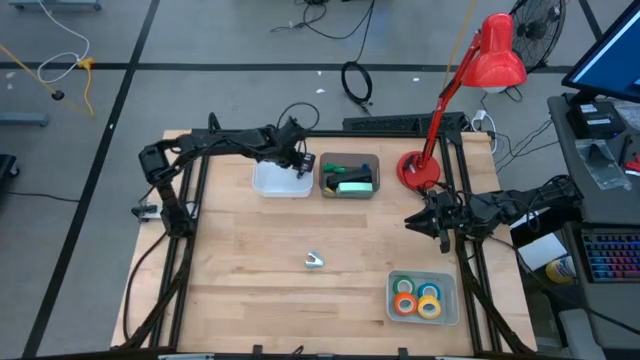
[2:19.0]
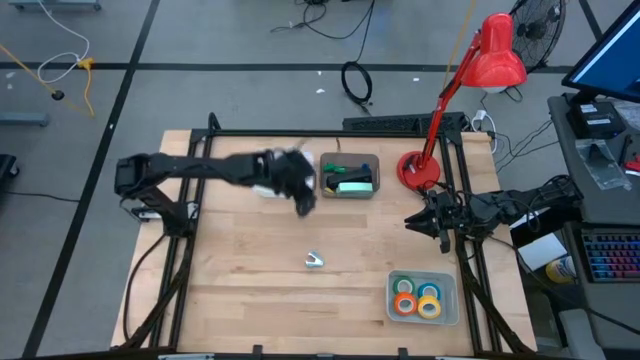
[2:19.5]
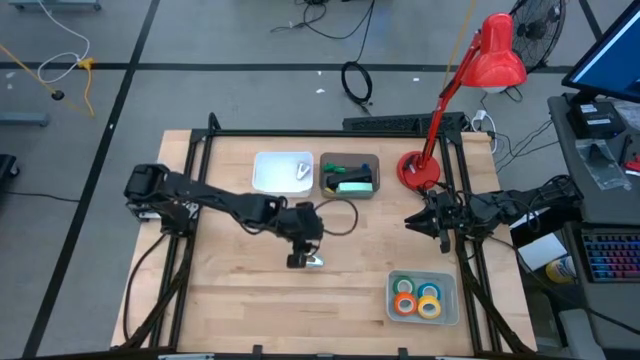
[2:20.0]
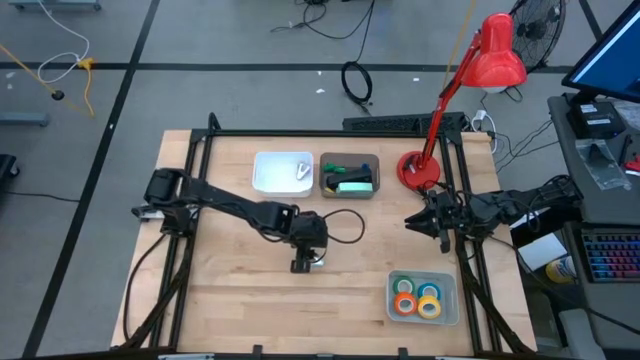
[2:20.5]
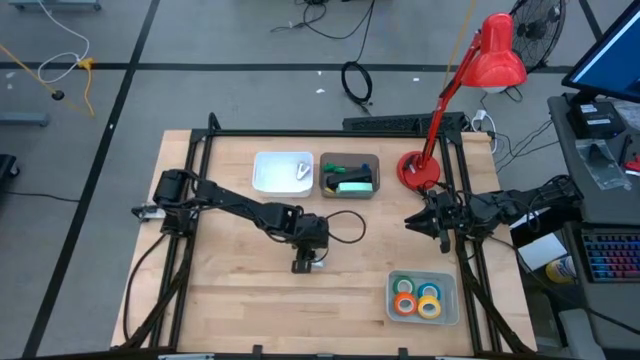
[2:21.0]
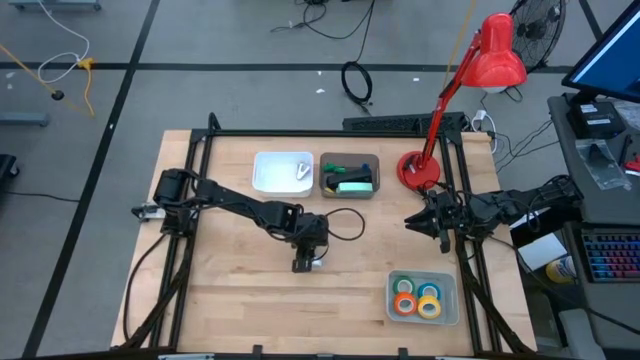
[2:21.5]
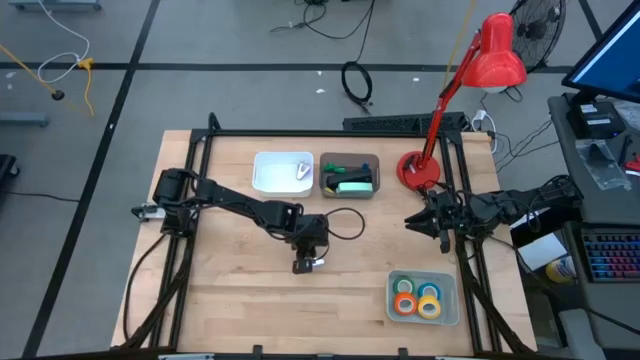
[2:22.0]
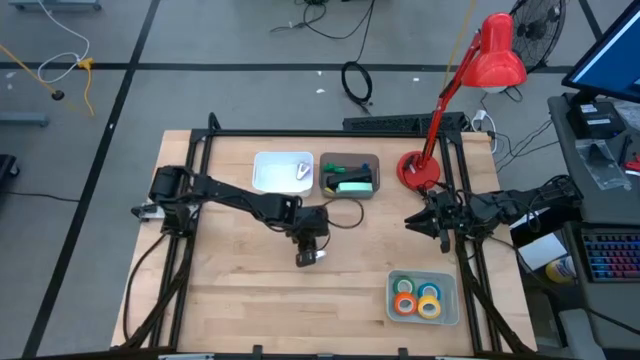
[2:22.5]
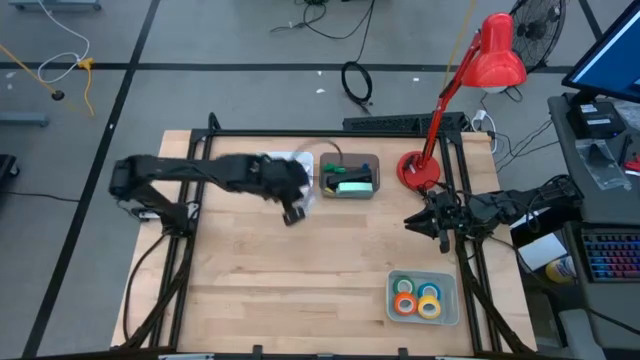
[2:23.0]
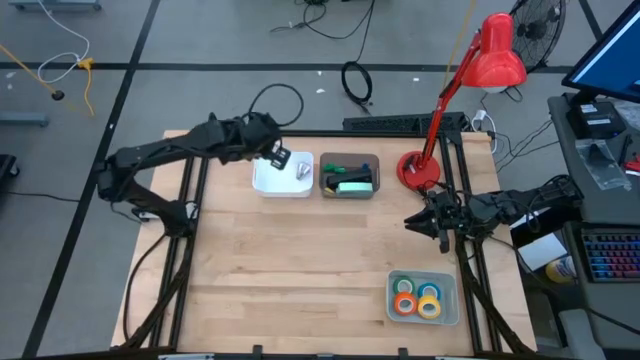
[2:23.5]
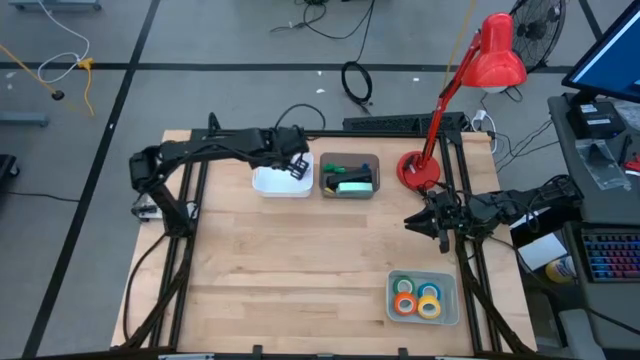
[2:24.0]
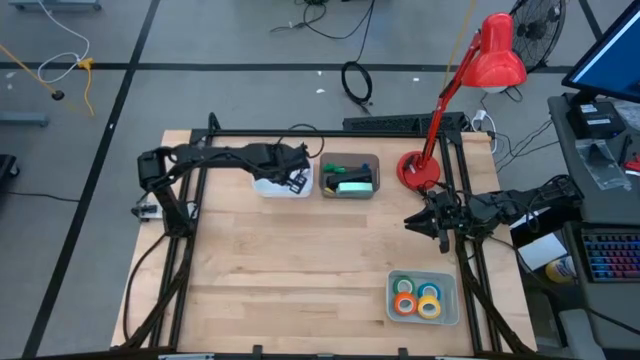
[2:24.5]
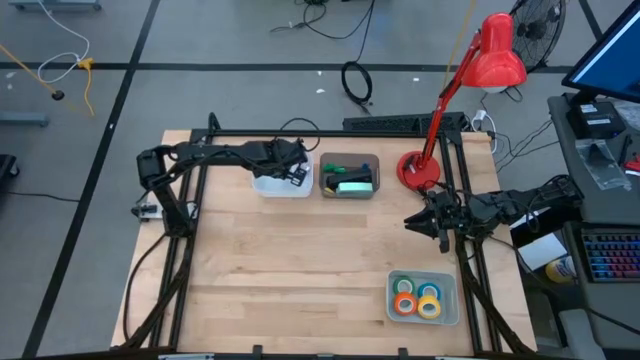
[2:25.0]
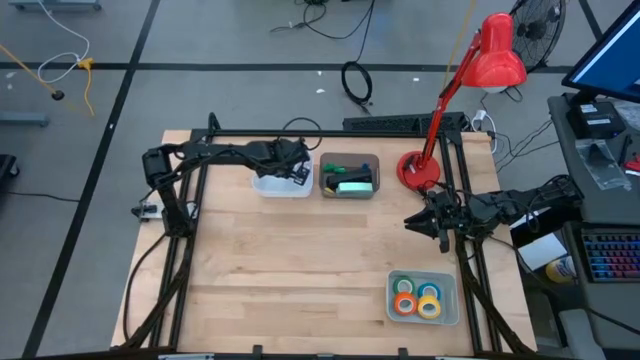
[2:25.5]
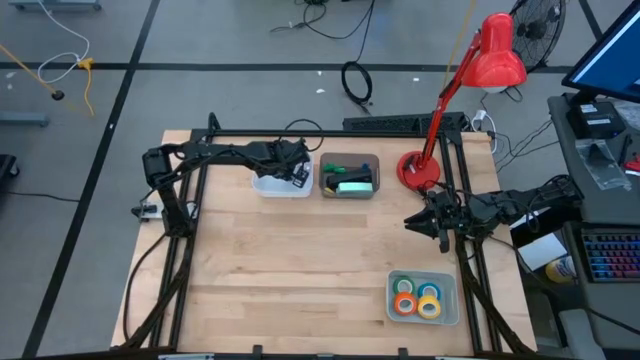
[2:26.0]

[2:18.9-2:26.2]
Task: Pick and place Stapler, Stapler remover, tape
Put the light blue staple remover into the white bin

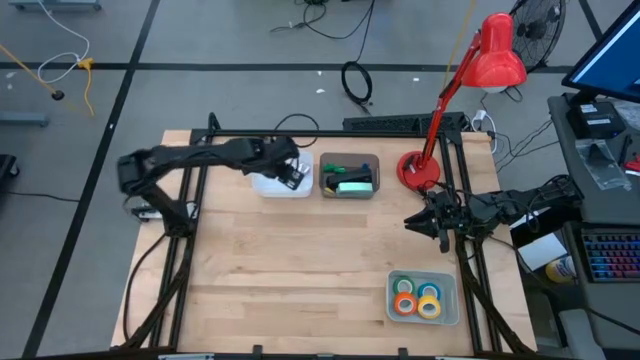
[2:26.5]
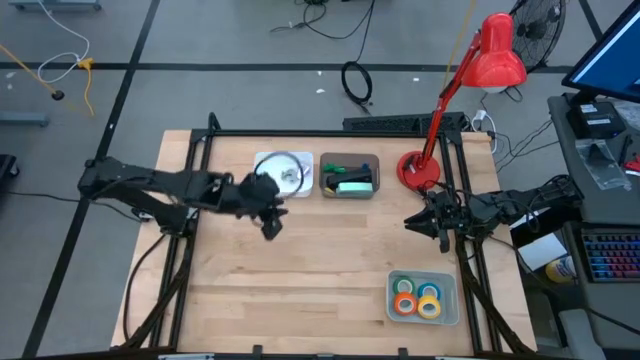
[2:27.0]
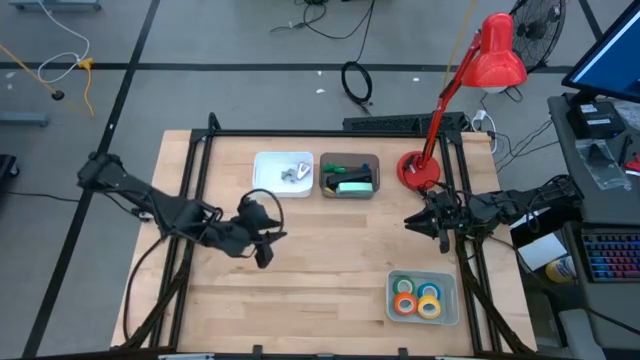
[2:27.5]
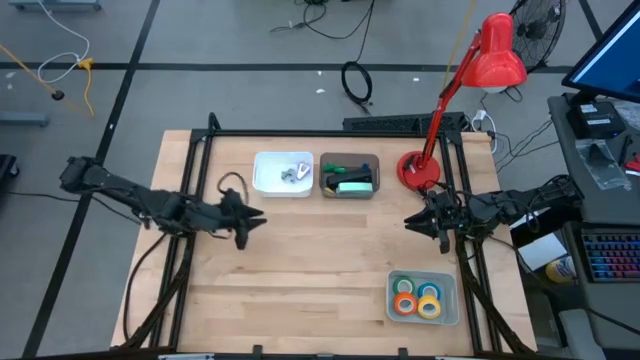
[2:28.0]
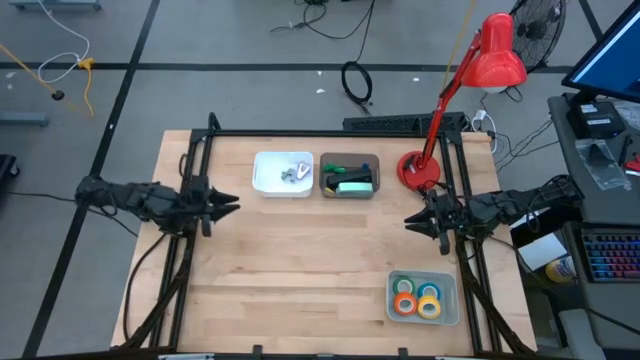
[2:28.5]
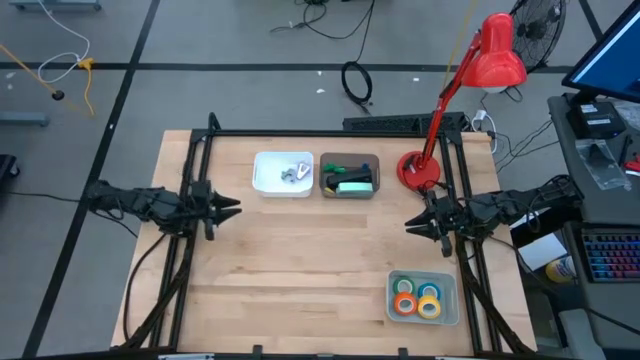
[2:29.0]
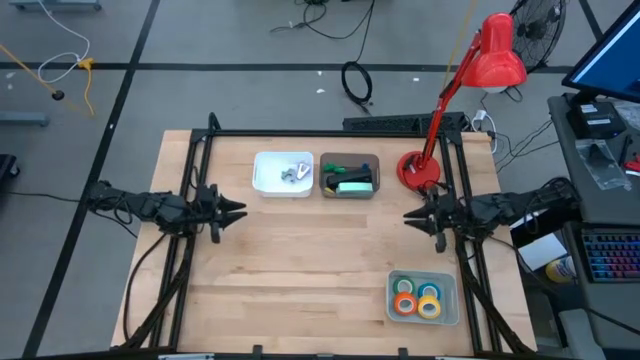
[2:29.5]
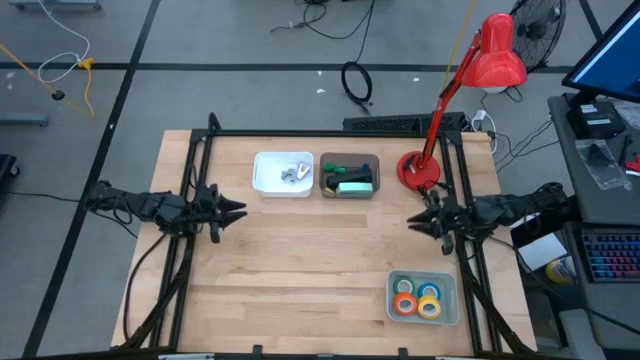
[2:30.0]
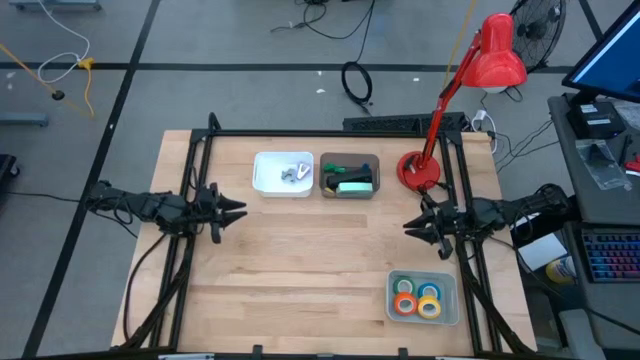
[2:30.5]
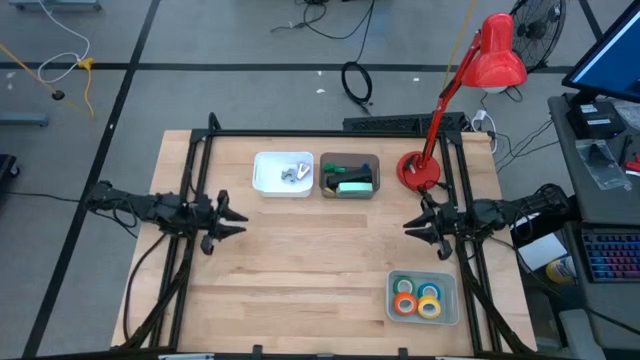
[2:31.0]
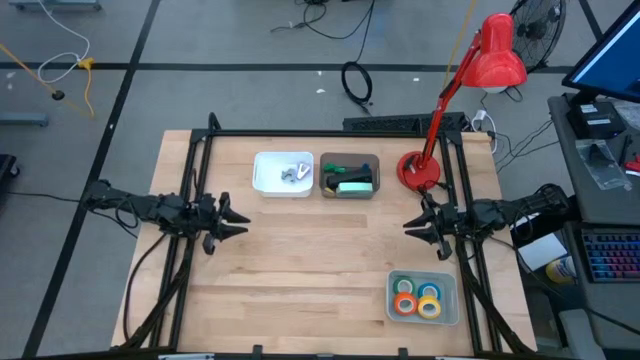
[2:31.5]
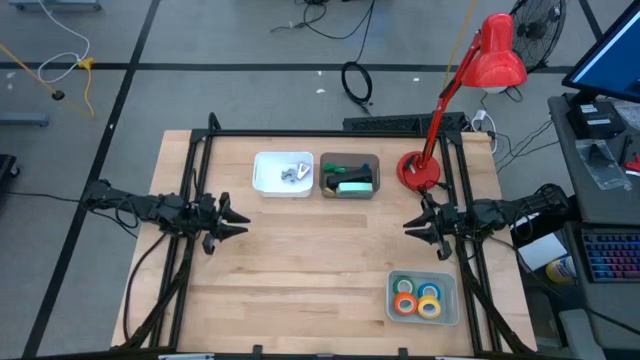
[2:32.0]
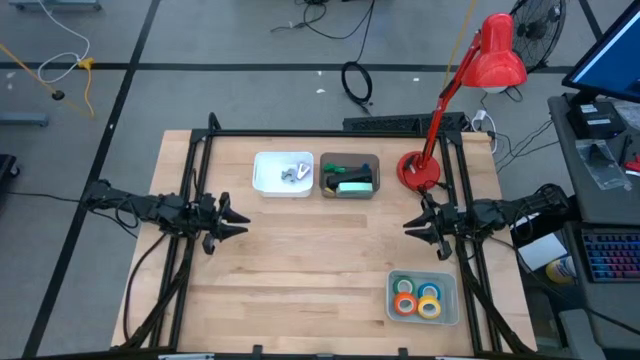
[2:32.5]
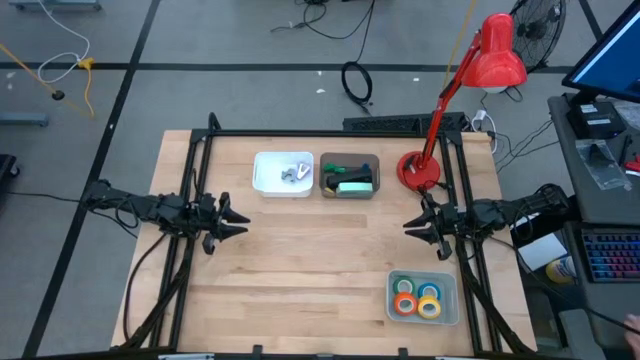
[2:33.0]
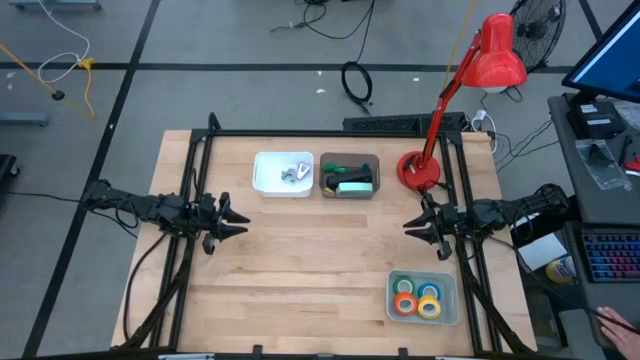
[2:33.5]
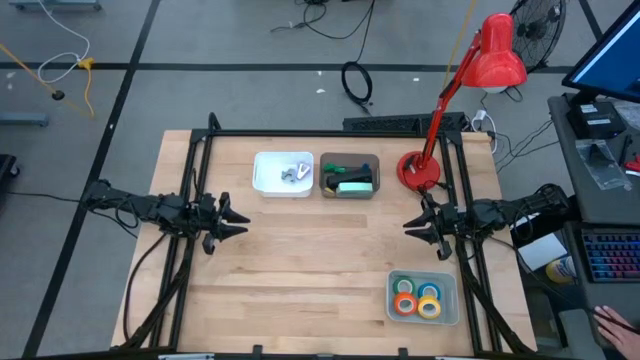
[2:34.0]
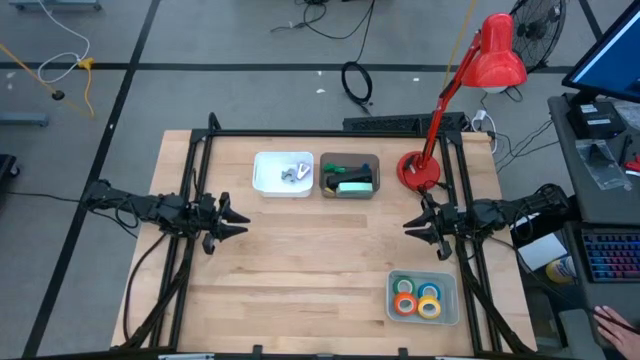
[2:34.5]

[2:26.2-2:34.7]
Return to Home Position

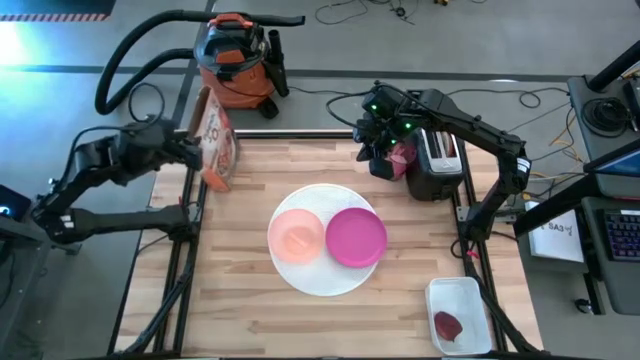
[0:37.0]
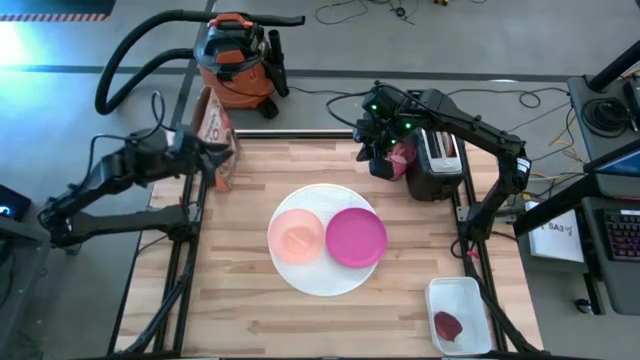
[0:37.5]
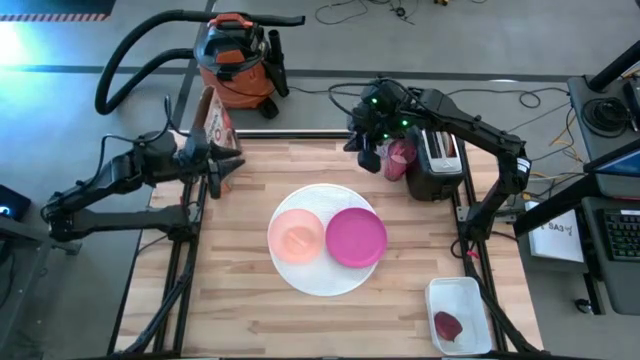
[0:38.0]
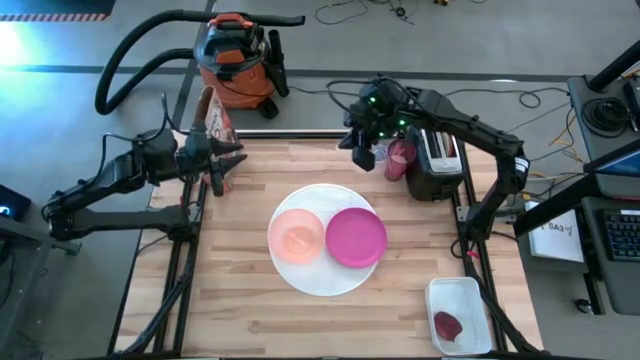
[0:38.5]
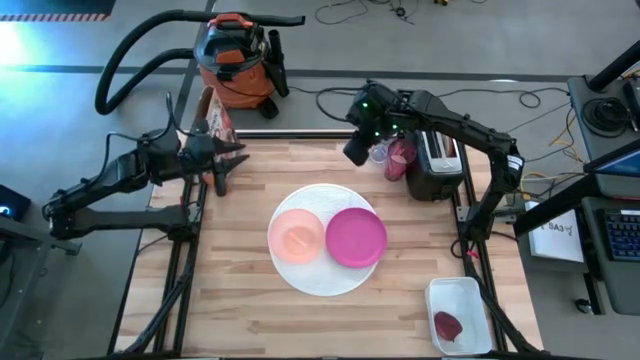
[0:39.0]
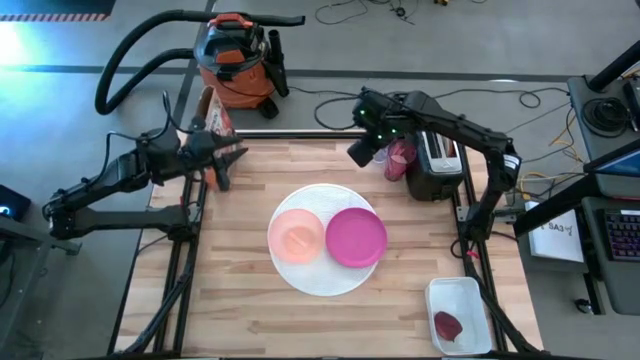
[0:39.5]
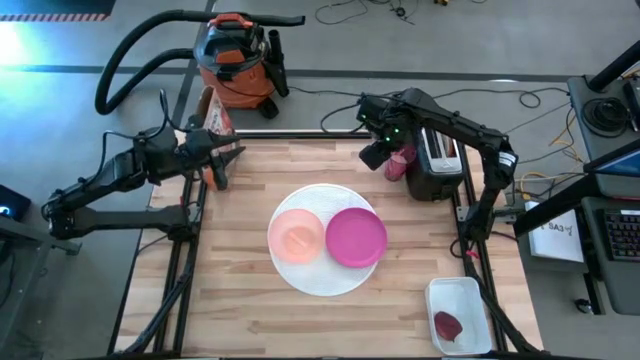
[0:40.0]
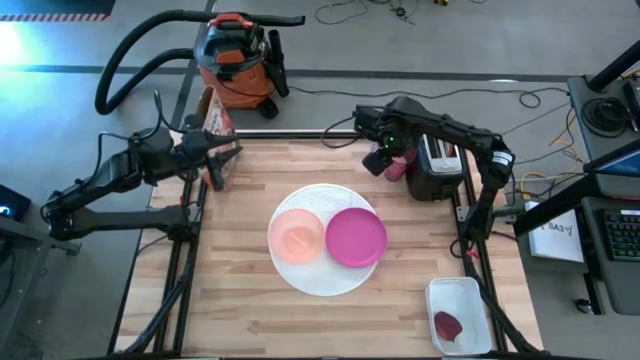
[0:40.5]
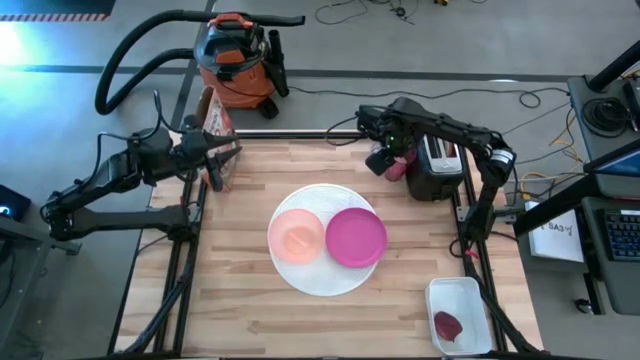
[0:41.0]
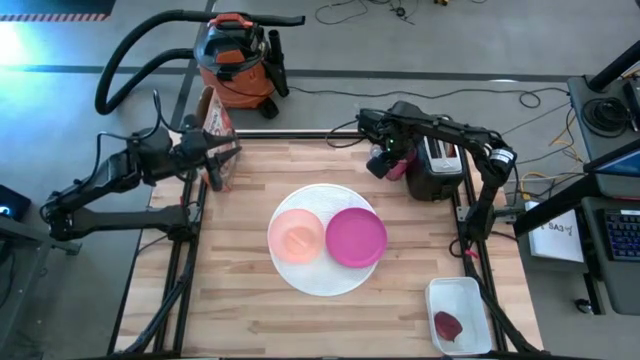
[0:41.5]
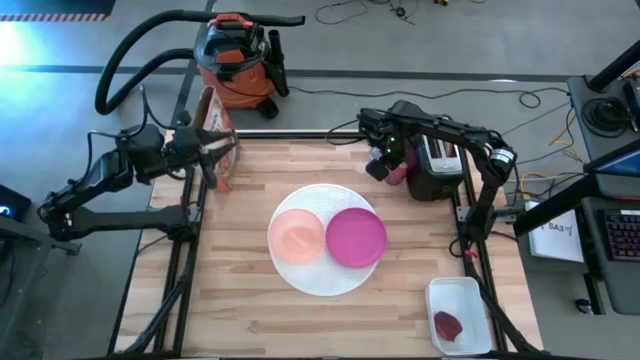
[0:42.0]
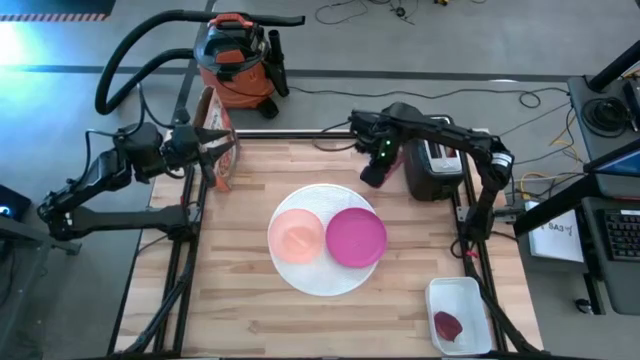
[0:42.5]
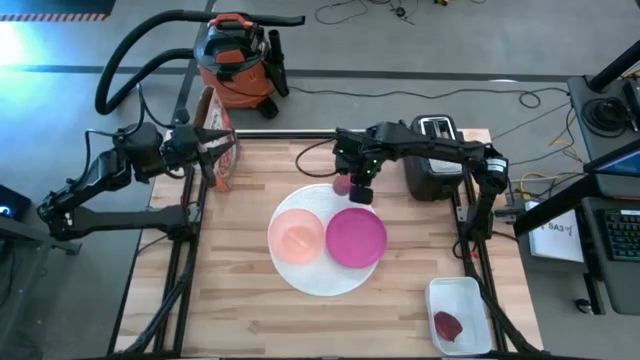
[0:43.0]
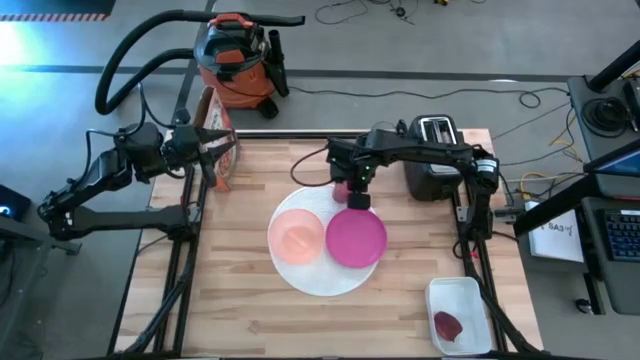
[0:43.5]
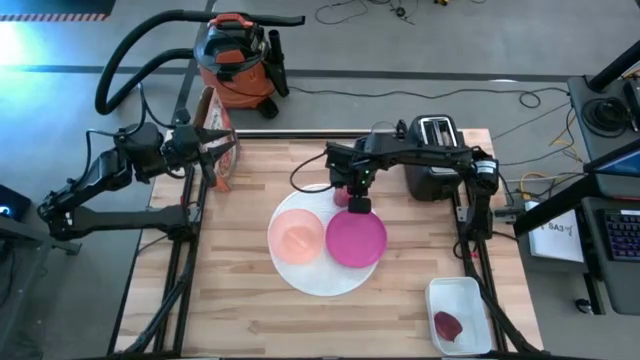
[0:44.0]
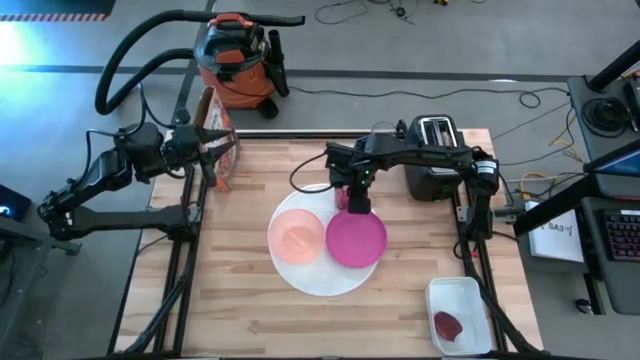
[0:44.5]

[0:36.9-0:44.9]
Task: Arrange a breakfast setting
Put the red glass of milk on the white table mat at the top of the pink plate
